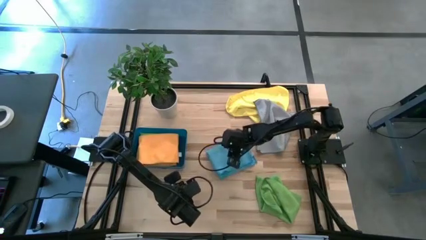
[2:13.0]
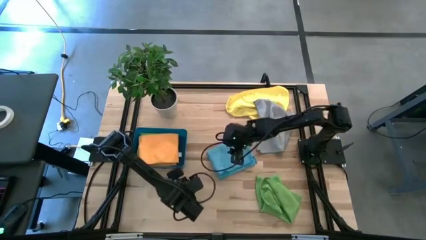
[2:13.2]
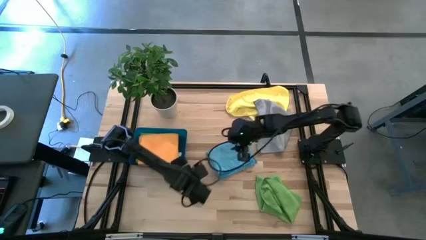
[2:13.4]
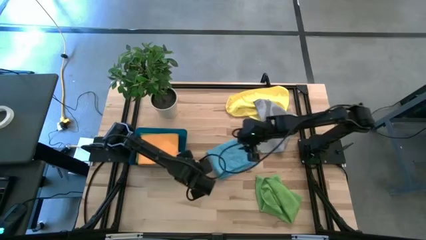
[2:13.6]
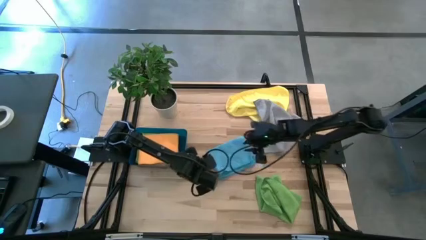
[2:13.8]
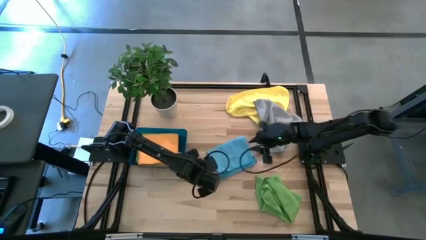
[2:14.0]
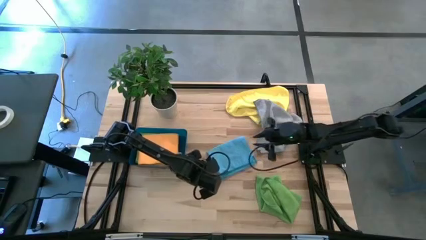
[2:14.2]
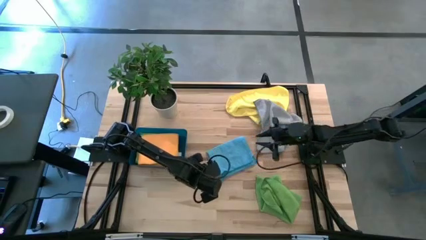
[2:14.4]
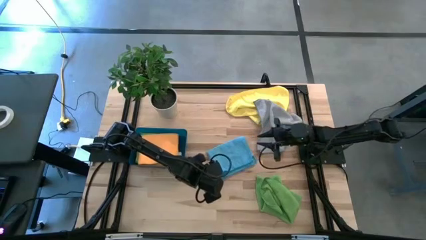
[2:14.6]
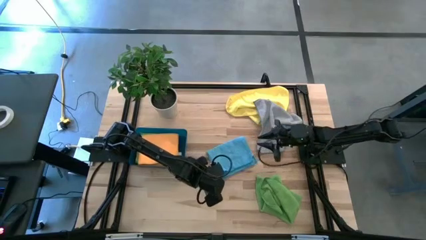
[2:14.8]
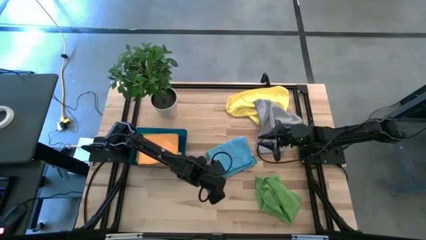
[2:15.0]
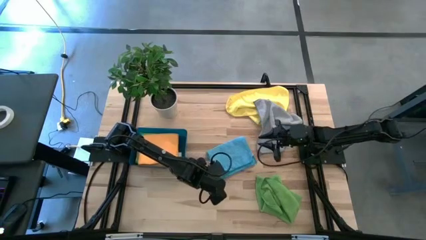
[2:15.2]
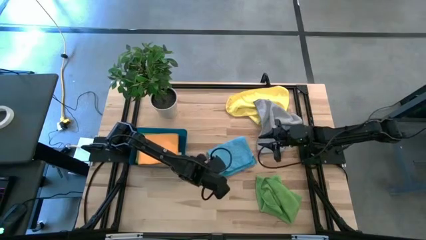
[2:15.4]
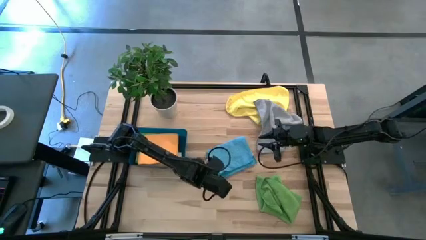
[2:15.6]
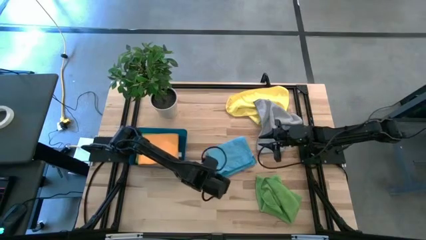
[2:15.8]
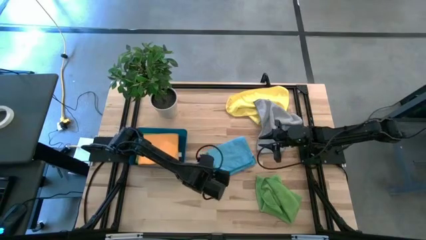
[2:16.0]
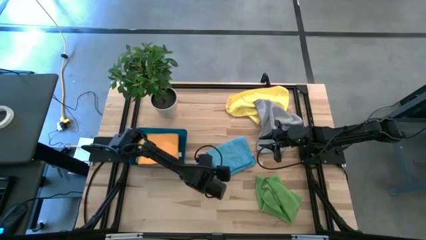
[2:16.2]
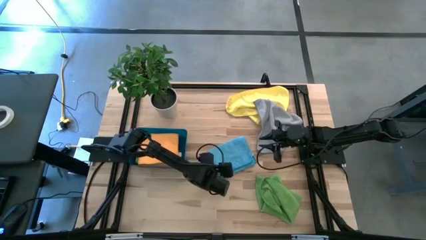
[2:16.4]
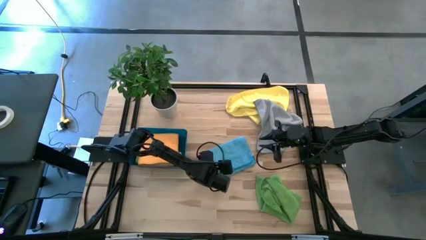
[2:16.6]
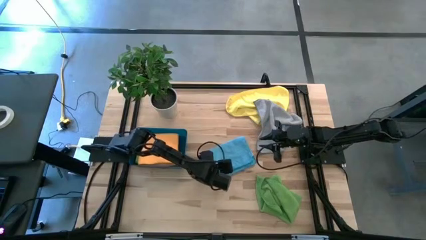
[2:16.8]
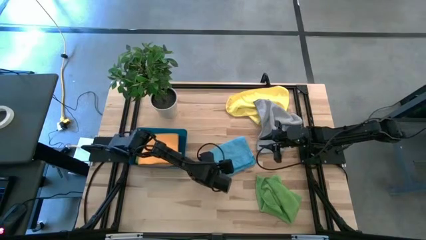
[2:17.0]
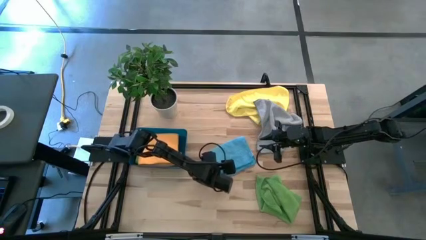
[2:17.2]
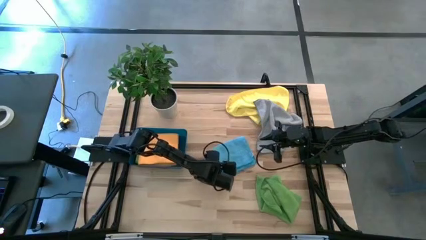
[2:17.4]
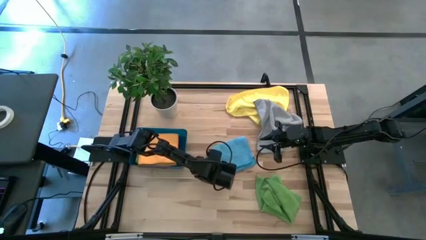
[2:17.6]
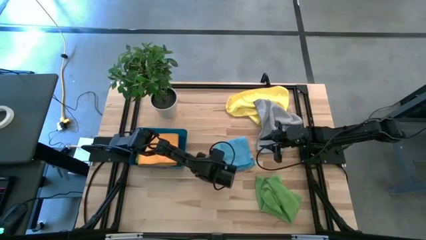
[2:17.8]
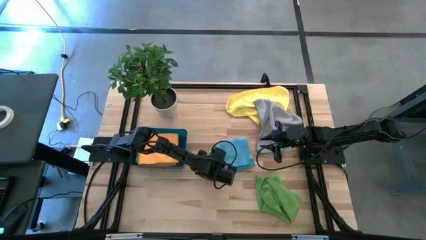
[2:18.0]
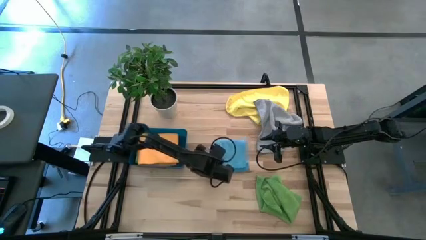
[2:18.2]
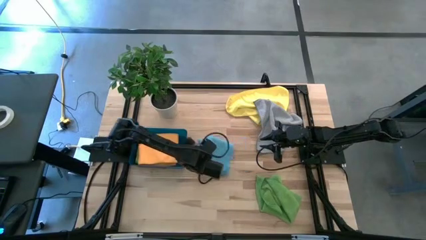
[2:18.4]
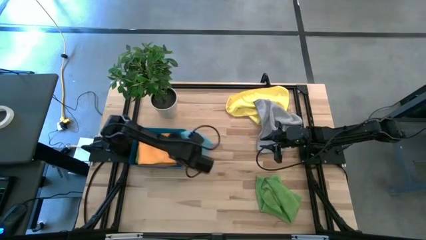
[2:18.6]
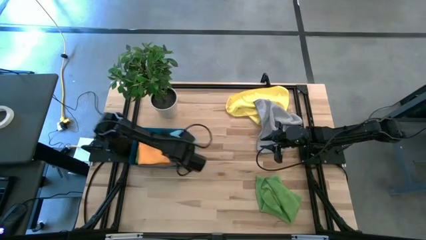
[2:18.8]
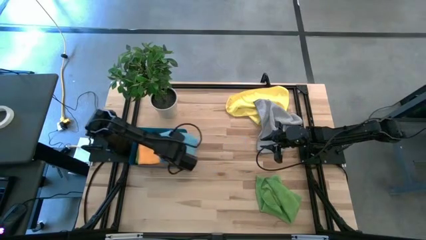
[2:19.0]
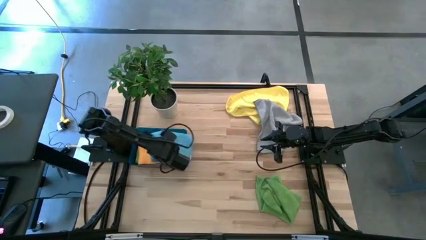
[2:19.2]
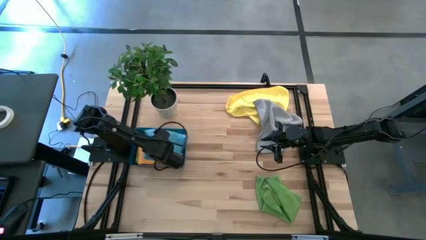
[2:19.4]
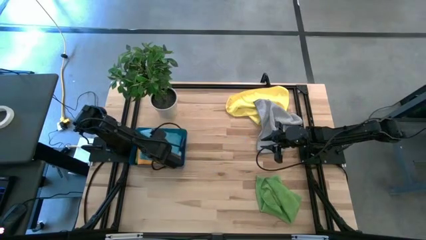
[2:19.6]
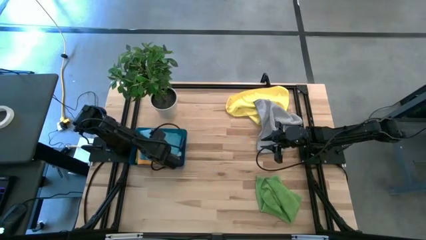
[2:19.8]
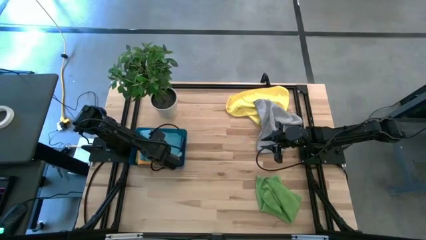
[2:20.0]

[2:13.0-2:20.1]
Task: Fold microfiber towels
Stack the blue microfiber towel on top of the orange microfiber towel in the blue bin

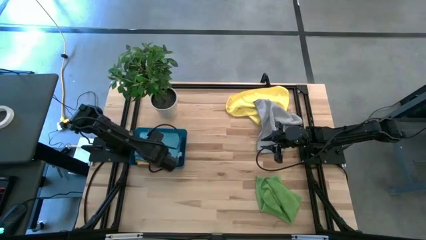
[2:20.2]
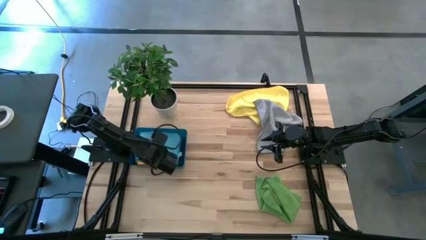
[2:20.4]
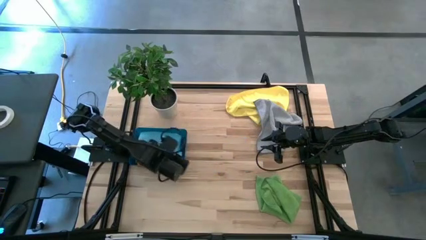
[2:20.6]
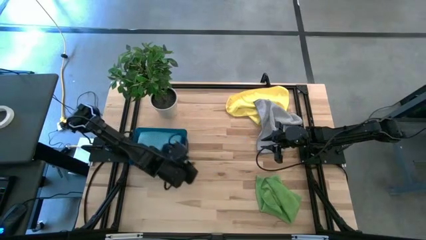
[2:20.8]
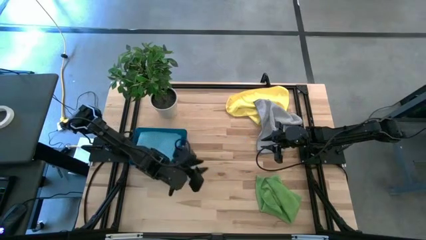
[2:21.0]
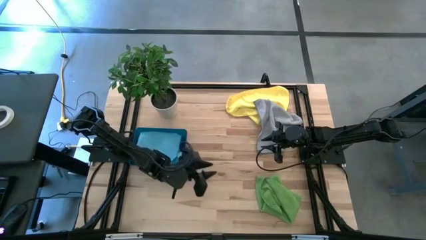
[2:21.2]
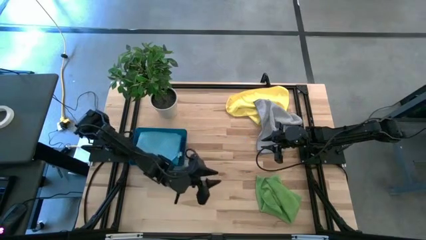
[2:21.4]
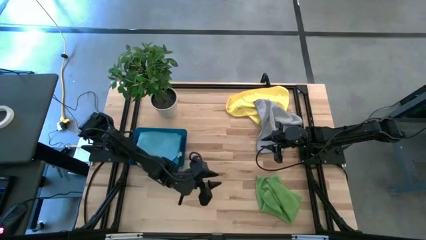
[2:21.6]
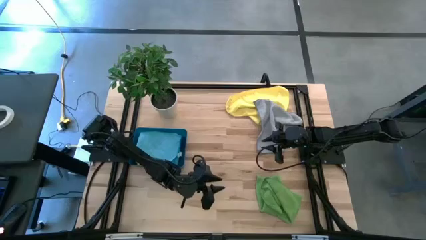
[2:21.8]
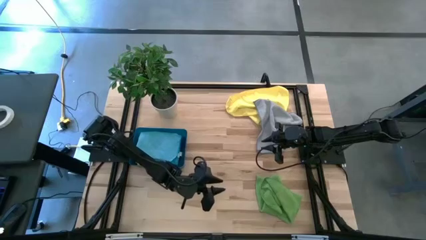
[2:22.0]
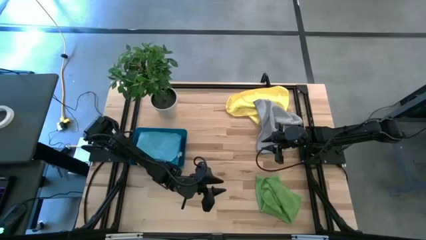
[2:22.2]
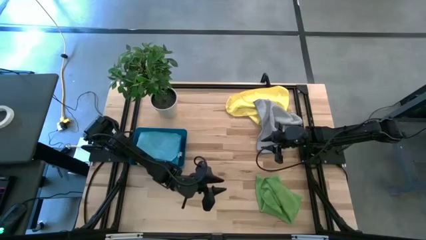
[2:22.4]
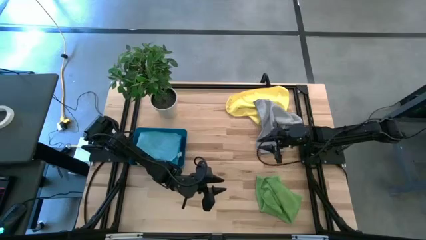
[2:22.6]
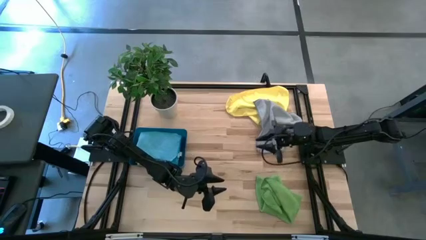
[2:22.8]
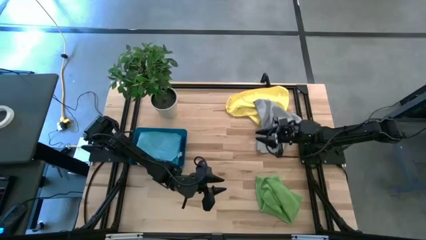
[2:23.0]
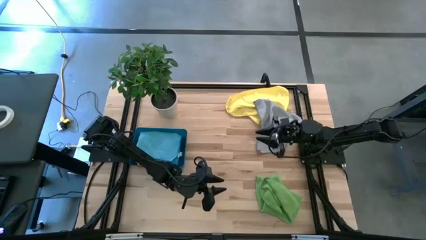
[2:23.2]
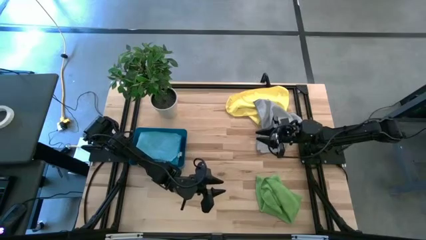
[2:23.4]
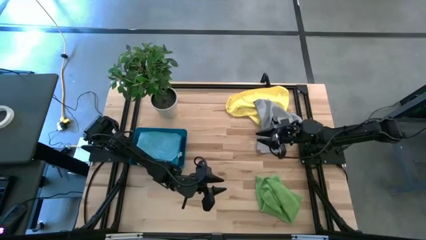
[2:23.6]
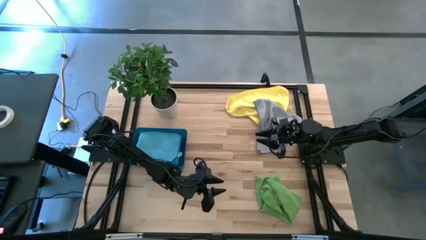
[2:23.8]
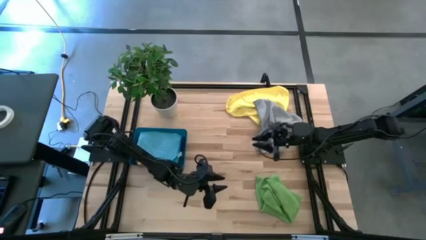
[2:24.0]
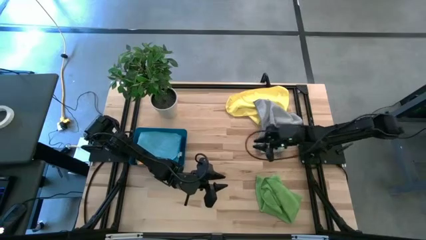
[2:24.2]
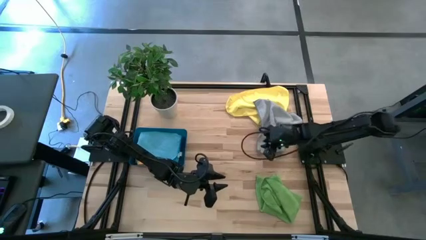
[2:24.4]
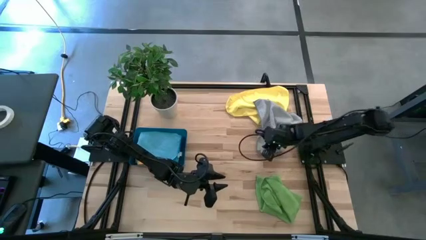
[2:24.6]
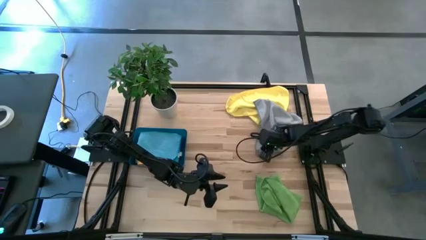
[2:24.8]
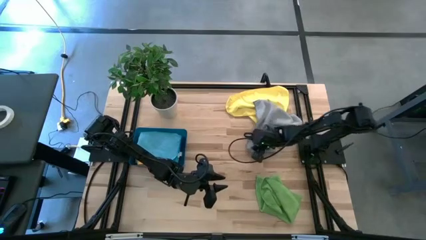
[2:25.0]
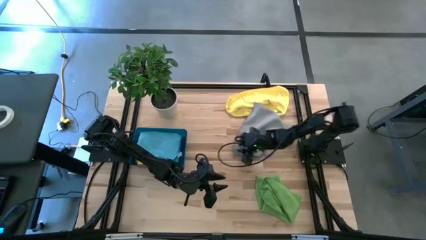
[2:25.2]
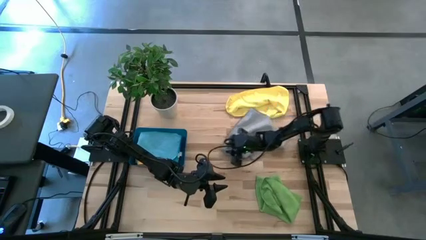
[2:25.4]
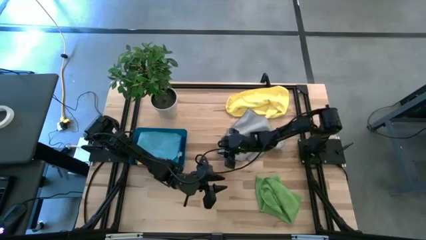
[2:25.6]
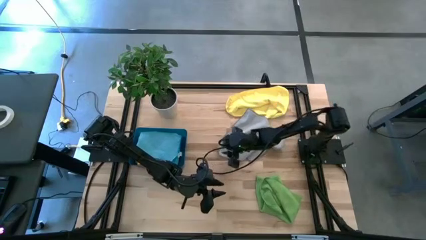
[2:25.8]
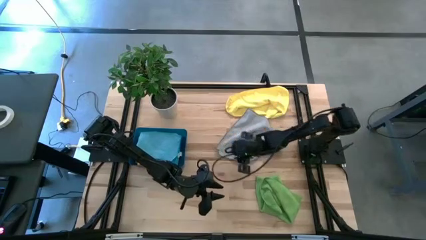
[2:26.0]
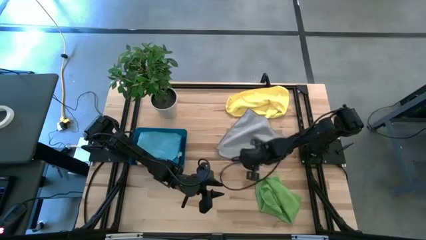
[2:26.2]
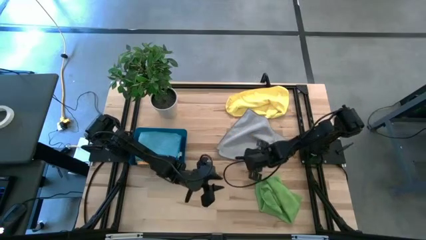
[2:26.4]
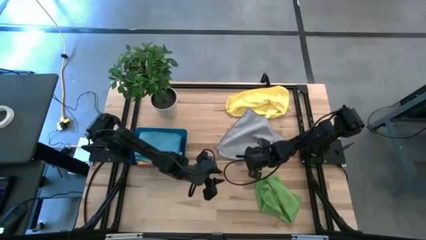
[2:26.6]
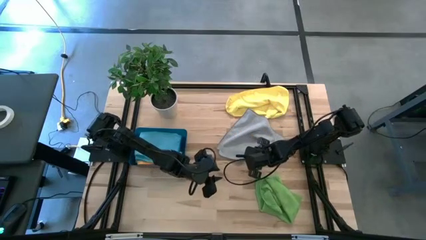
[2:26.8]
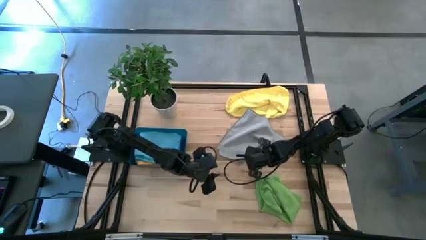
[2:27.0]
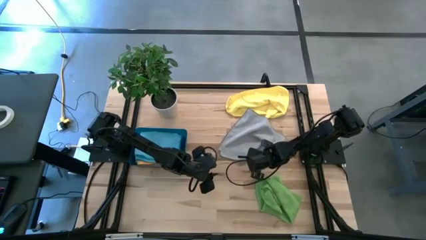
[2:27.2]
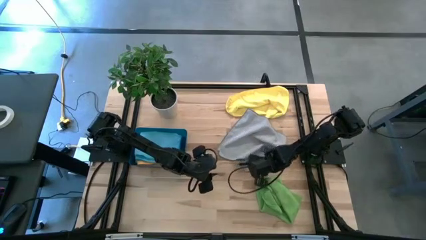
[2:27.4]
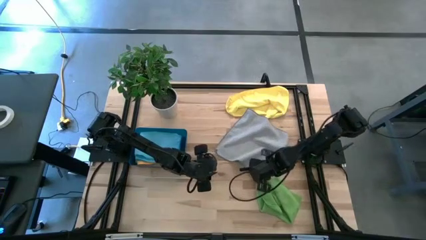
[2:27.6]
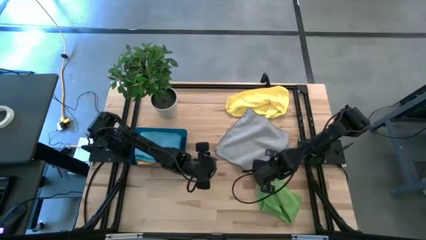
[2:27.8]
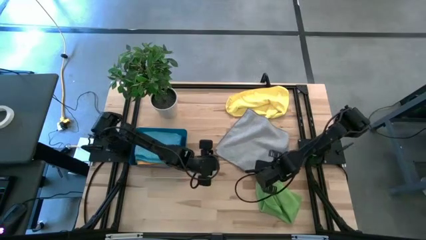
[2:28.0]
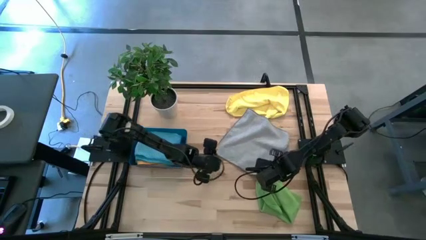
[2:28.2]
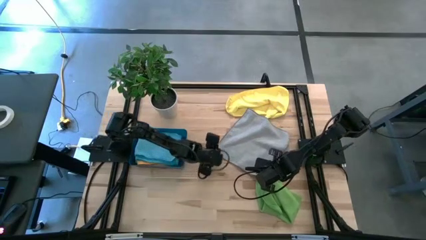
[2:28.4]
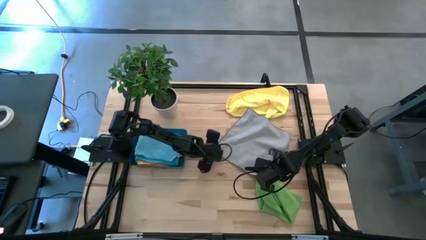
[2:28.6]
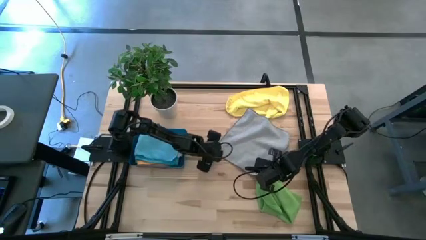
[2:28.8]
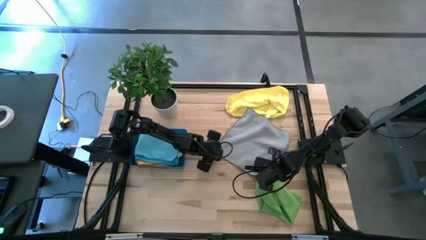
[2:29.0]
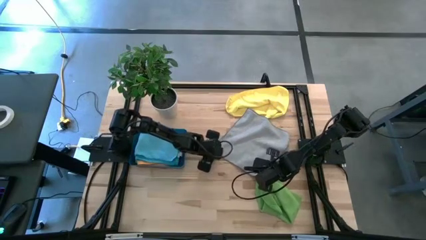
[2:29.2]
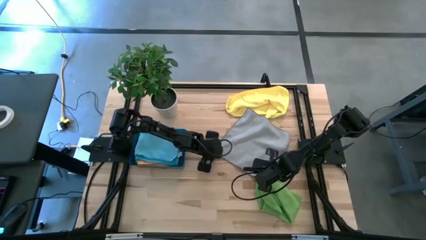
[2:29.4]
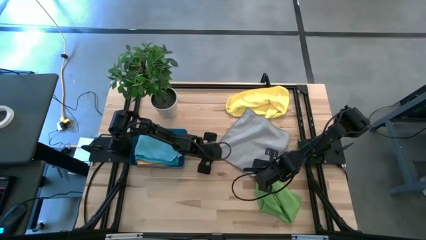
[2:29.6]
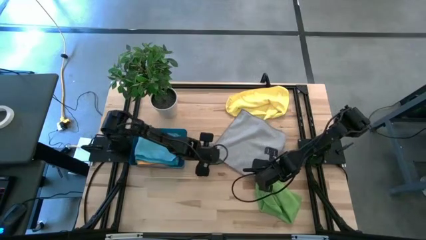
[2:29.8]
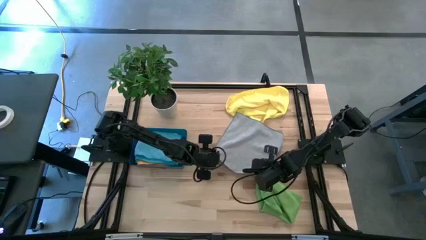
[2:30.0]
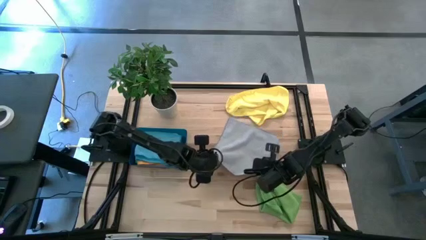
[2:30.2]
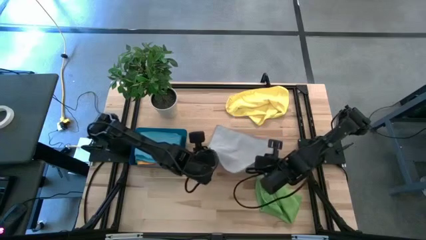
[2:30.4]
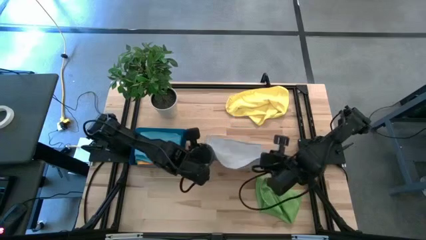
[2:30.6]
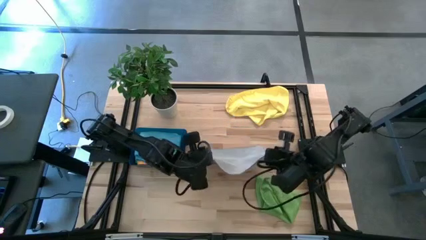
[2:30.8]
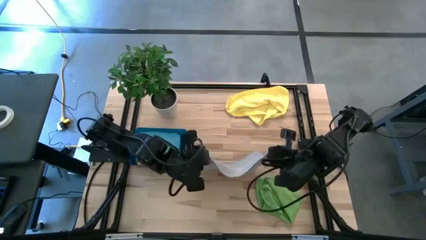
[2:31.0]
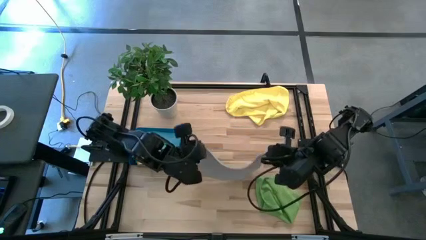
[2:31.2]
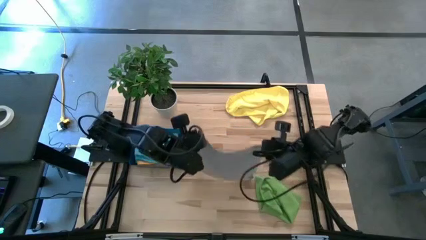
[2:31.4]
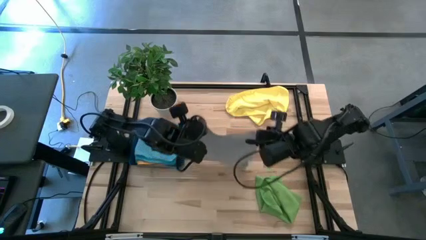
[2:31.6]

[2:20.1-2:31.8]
Fold the gray towel on the table
